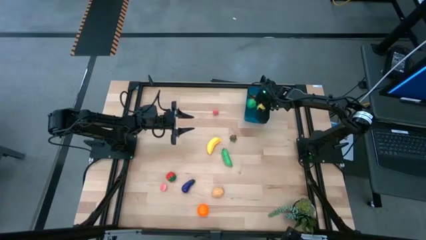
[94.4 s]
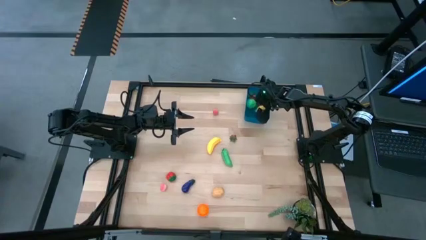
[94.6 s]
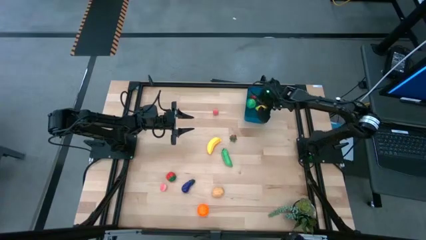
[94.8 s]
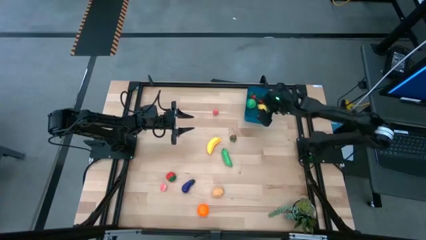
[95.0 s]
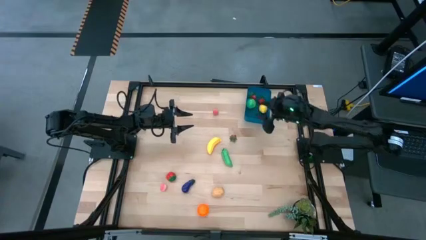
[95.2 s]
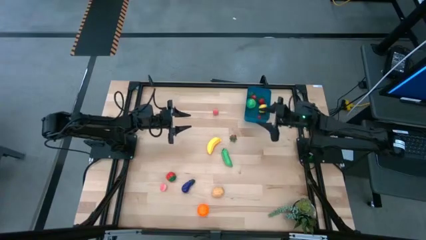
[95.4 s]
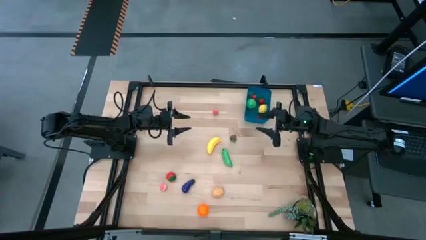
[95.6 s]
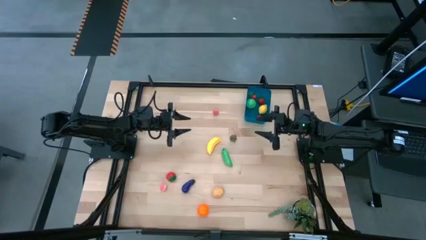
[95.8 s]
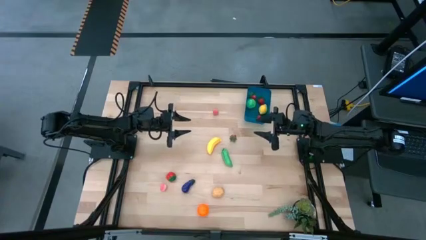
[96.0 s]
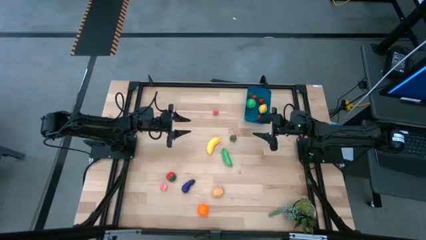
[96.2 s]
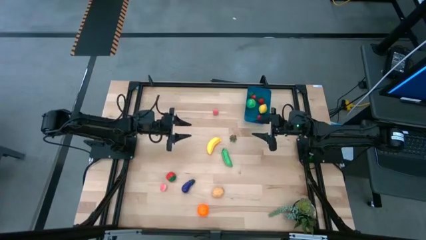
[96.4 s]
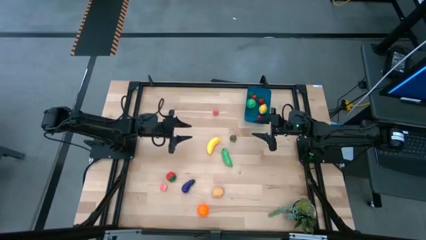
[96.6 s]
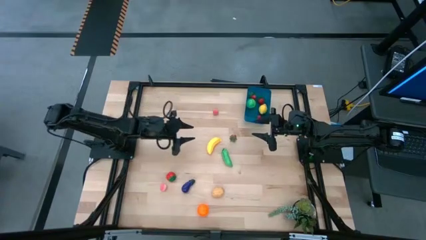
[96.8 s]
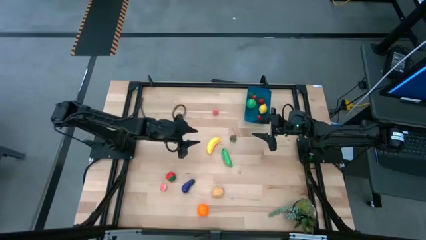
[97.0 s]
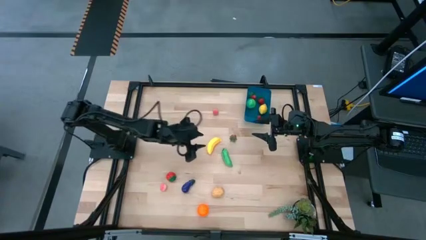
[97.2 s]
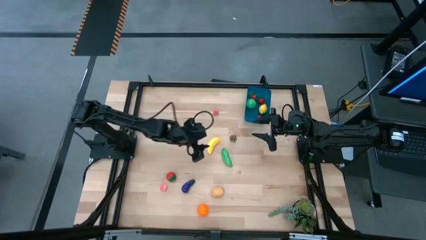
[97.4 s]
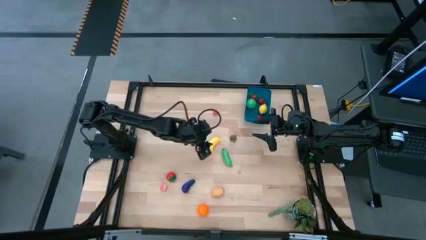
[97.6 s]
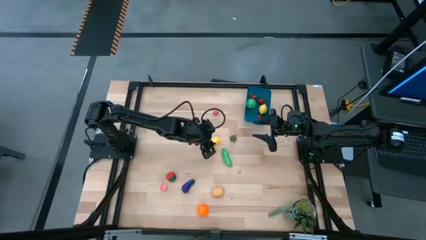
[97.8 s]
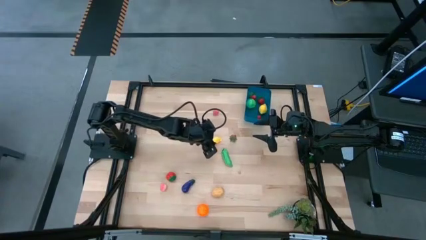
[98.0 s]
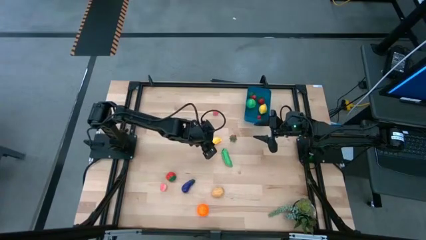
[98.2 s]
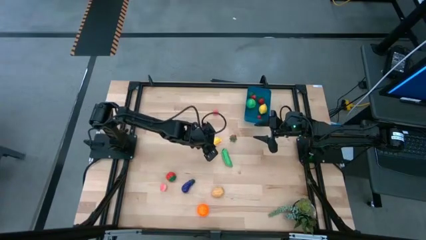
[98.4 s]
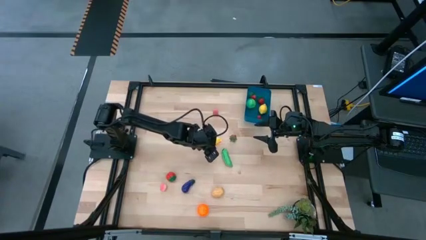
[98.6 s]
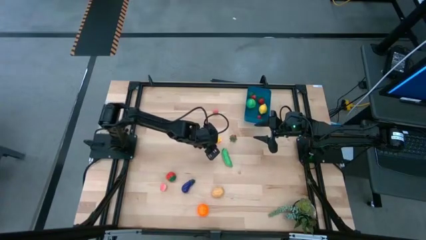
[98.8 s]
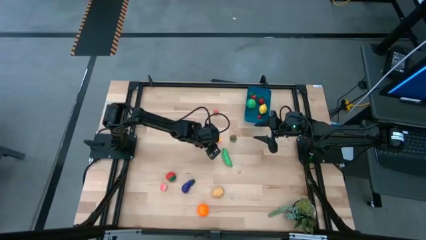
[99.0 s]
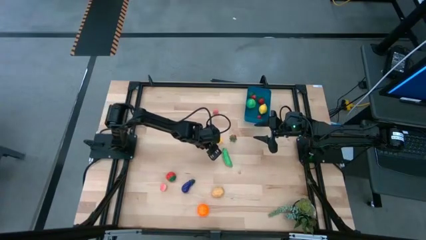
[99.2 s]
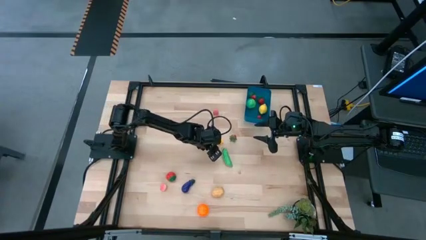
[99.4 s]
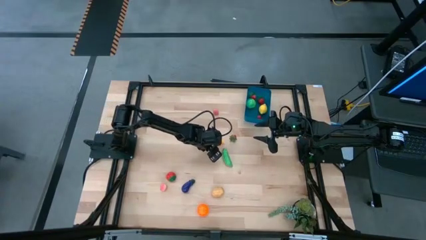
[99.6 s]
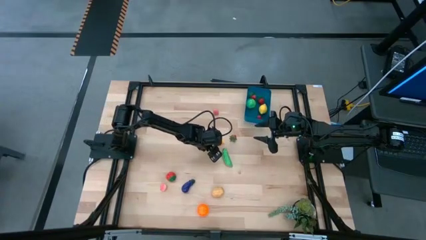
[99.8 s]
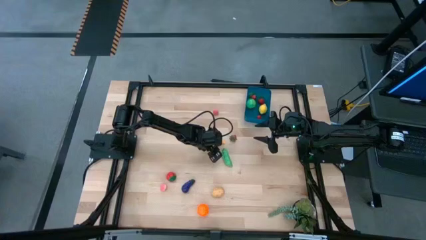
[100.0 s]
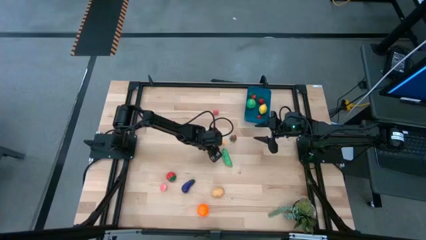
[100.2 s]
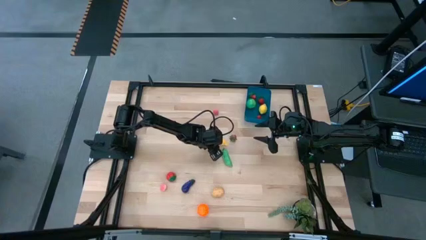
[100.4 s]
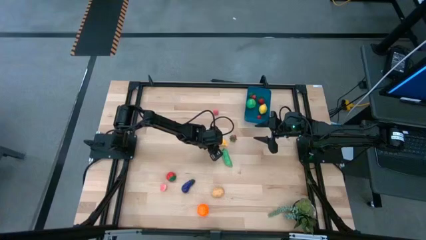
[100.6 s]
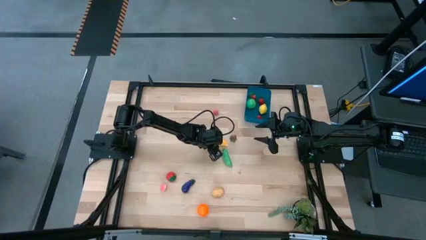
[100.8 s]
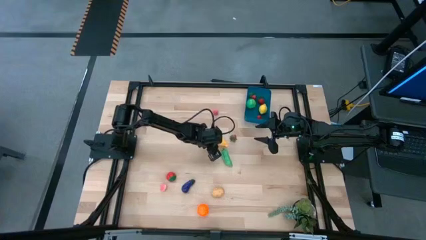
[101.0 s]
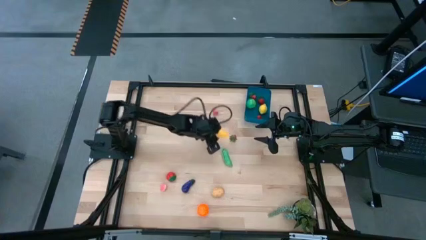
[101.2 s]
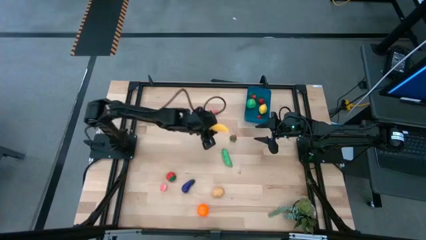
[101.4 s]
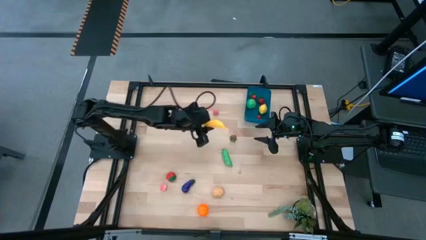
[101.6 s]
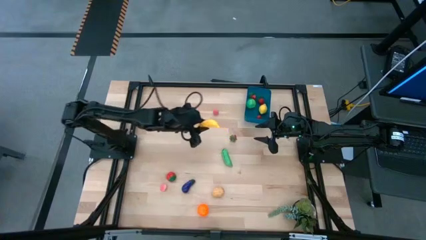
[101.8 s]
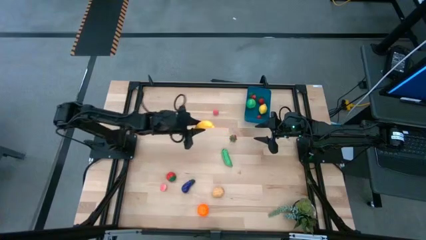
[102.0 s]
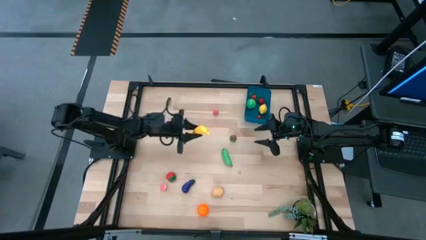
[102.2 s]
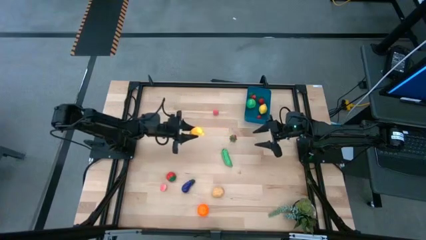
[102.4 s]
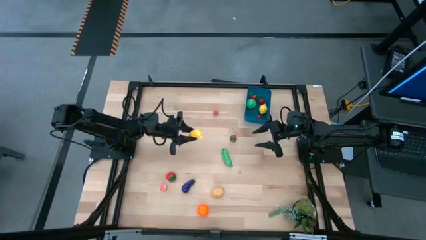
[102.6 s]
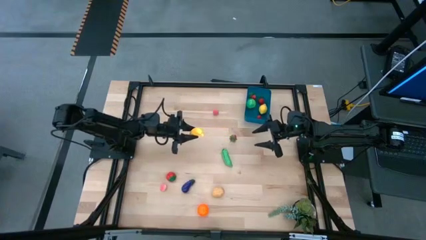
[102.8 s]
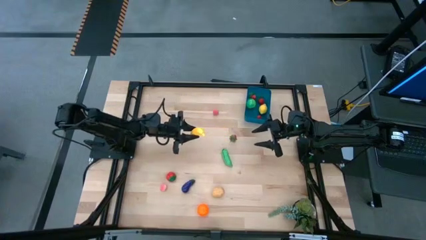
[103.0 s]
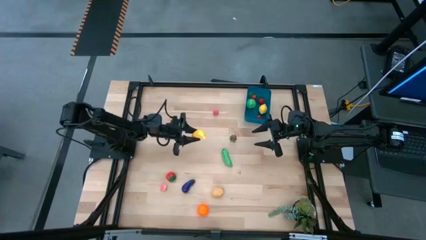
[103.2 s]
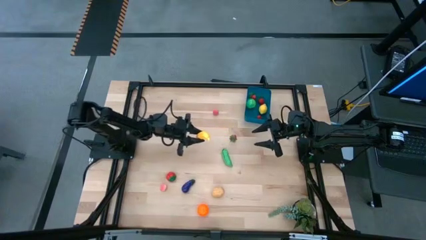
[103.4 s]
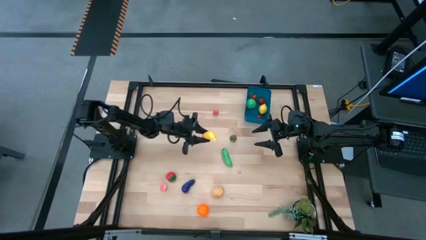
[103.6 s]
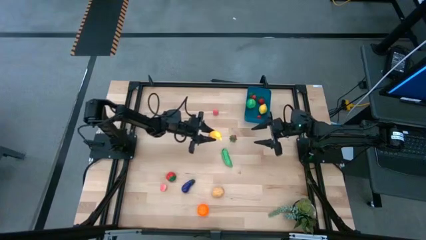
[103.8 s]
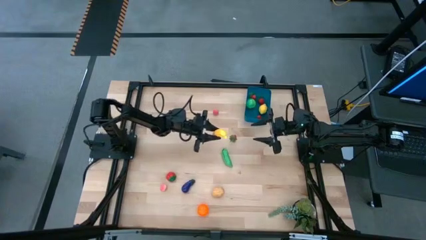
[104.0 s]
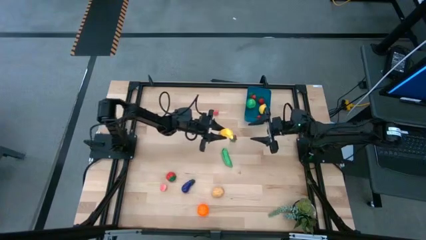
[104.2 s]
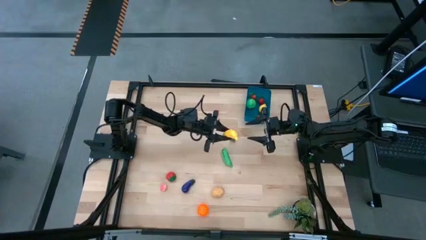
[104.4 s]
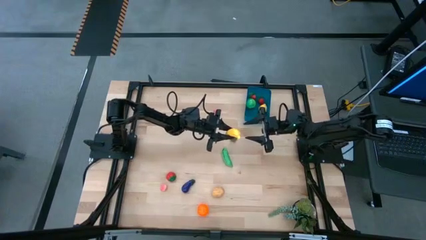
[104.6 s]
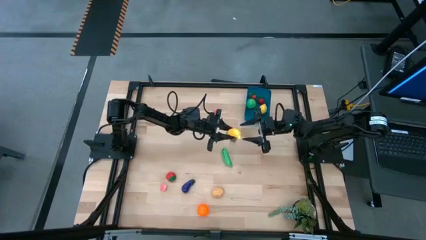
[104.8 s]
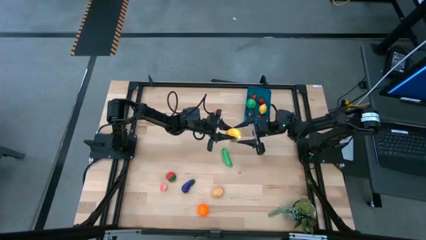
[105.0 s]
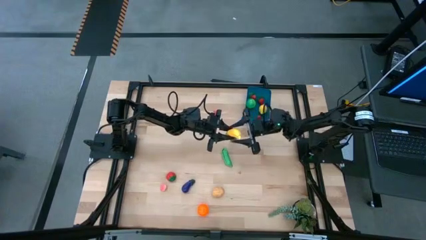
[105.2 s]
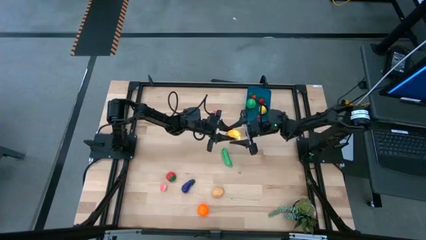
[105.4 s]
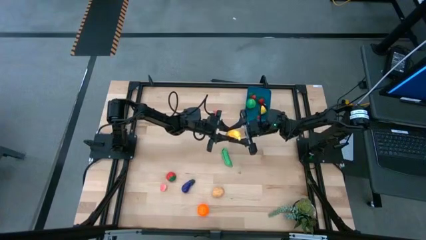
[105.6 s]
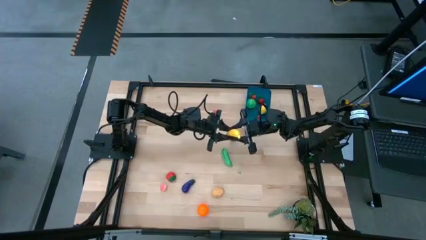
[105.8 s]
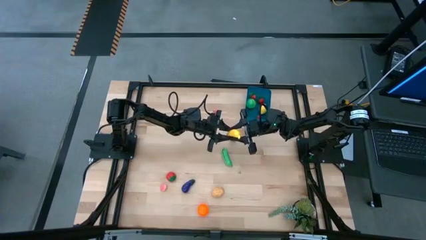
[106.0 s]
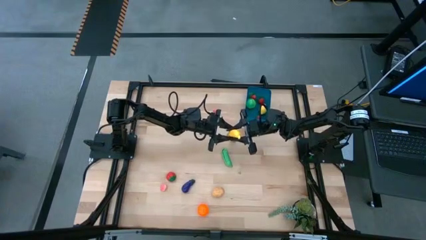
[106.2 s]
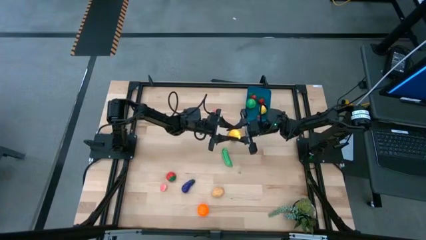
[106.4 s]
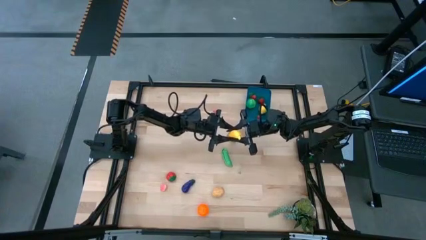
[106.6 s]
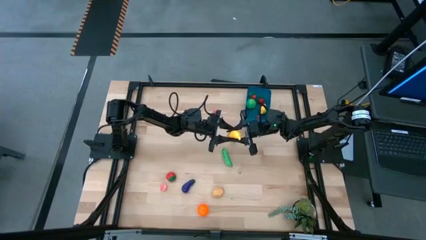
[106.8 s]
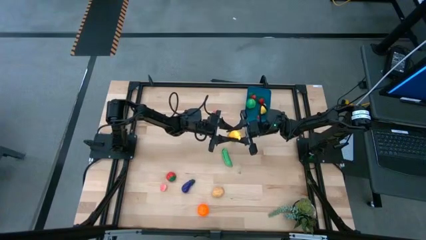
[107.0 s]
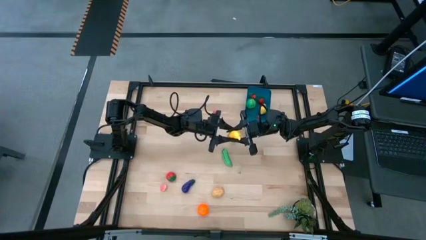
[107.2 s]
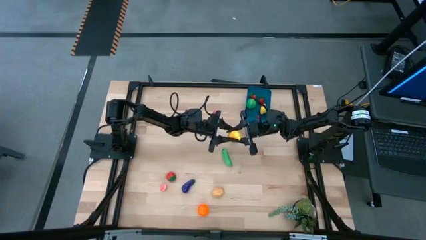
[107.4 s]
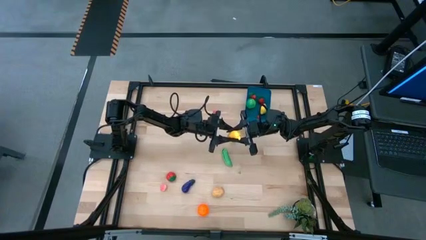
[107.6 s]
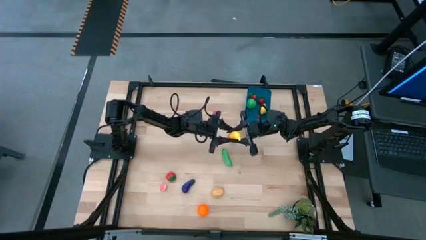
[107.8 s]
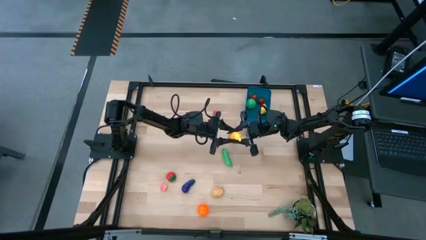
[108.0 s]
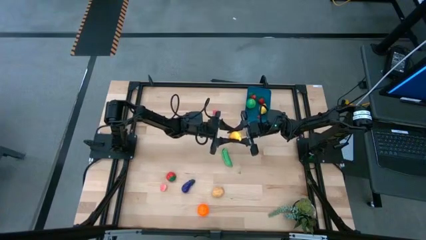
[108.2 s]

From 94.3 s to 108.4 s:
Task: Pick and placing Produce into tupperware
Put the yellow banana into the blue bin

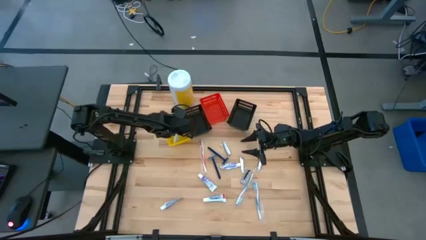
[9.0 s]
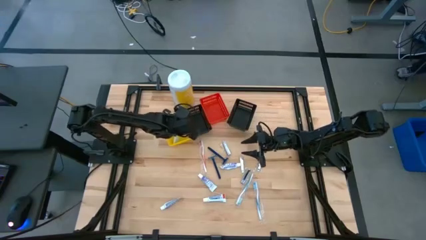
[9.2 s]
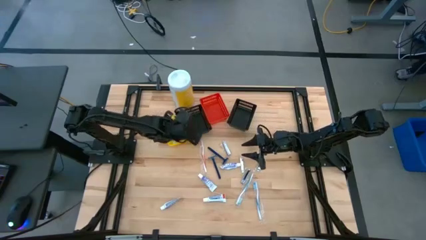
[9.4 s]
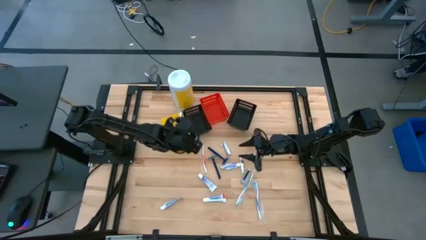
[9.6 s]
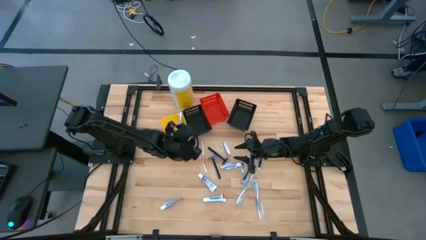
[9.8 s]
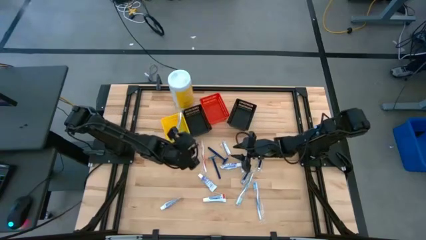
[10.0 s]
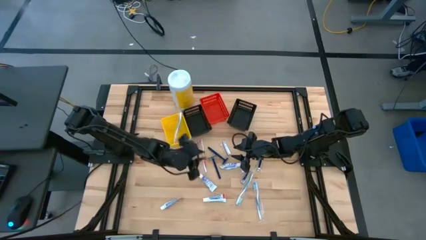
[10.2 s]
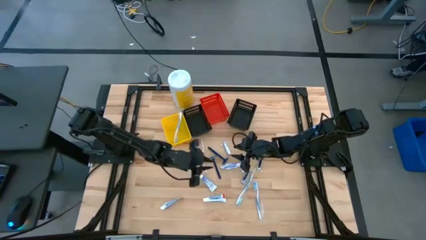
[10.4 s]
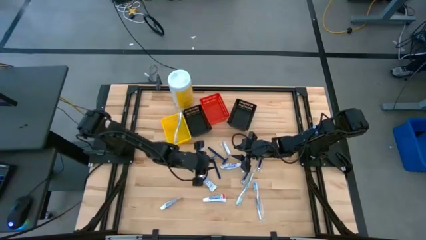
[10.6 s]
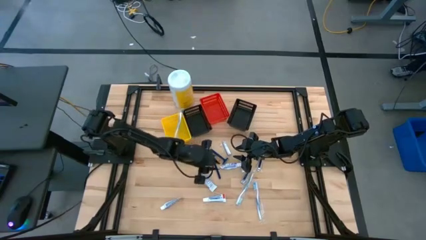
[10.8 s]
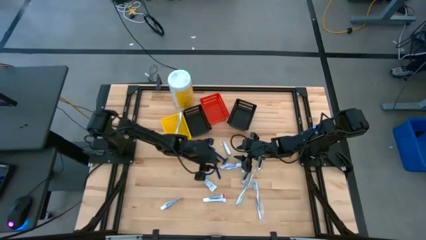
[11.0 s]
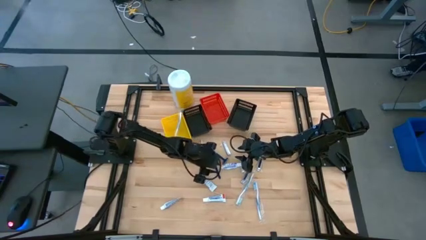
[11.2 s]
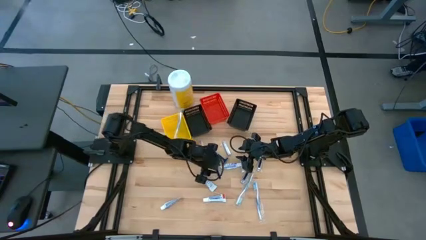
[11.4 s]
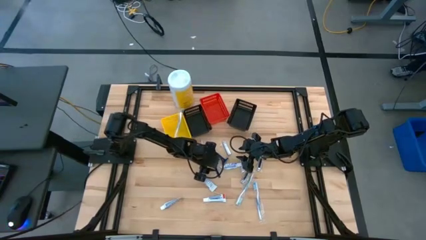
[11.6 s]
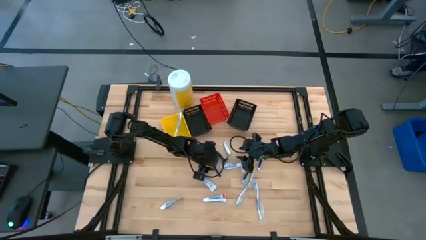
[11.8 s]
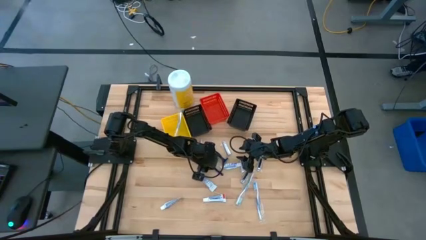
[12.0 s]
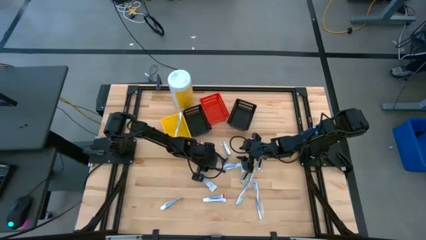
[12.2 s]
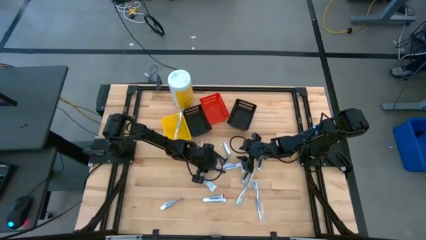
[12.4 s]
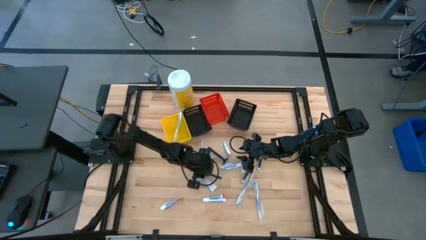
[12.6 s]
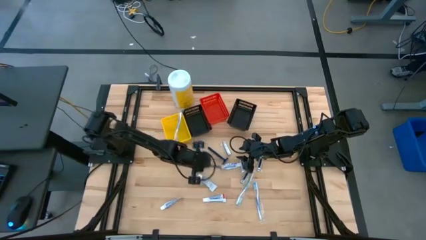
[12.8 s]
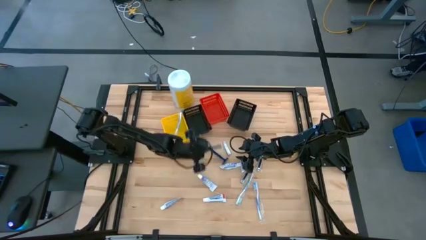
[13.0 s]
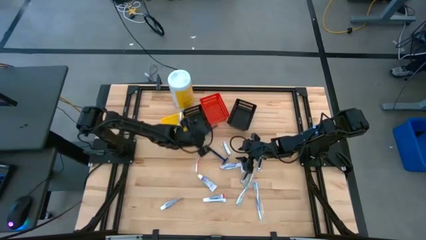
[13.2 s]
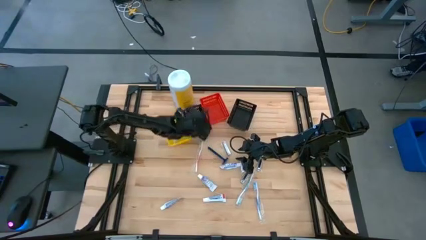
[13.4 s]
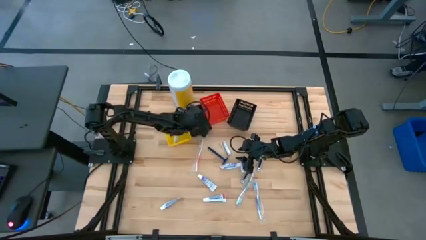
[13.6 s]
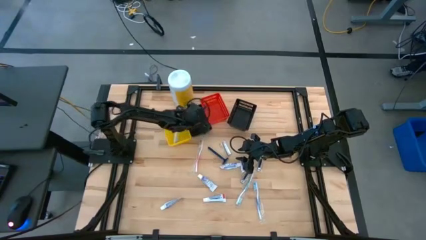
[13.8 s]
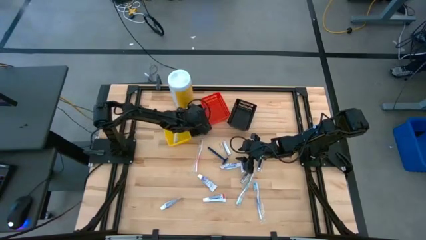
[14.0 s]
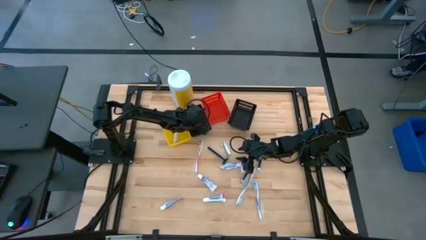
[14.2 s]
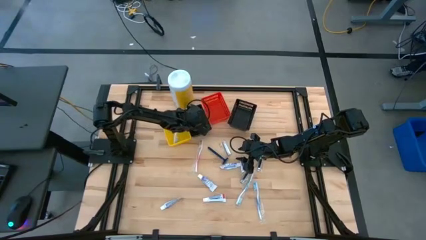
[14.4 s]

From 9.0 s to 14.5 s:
Task: Pick & Place Travel size toiletries
Put the blue razor into the left black bin
